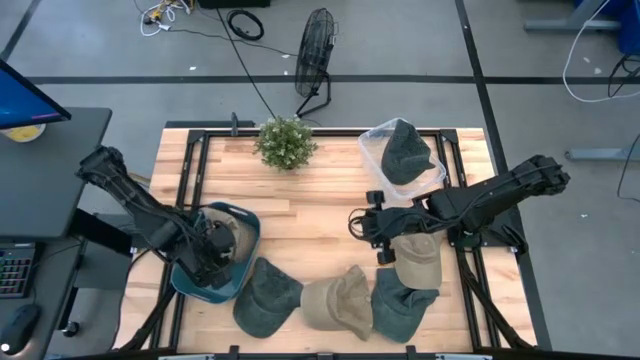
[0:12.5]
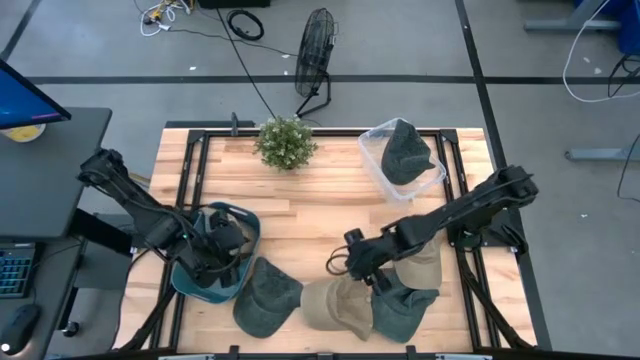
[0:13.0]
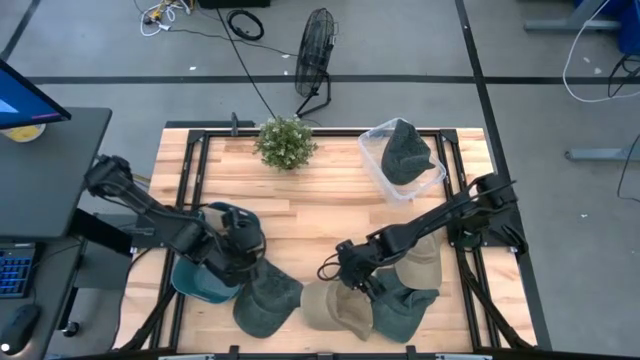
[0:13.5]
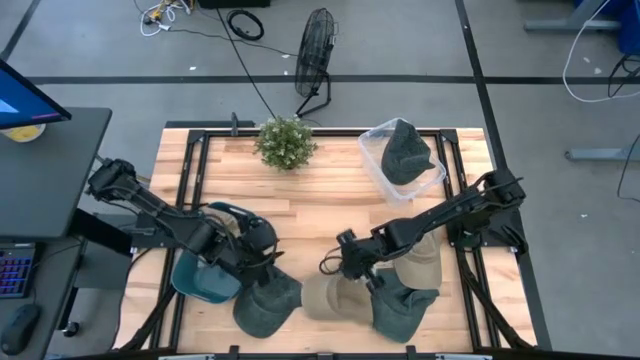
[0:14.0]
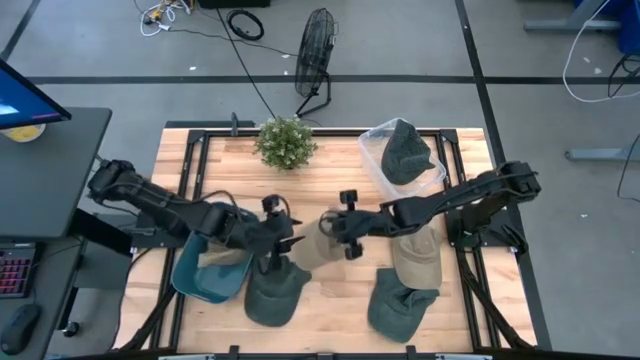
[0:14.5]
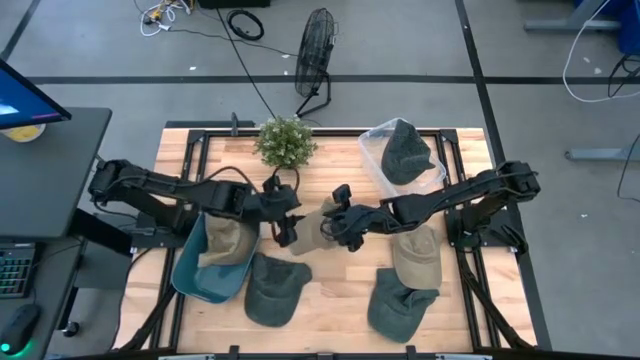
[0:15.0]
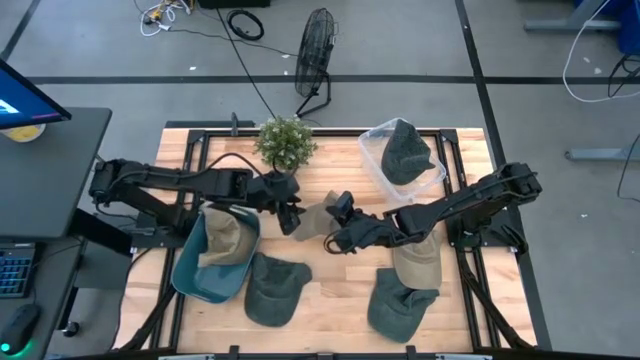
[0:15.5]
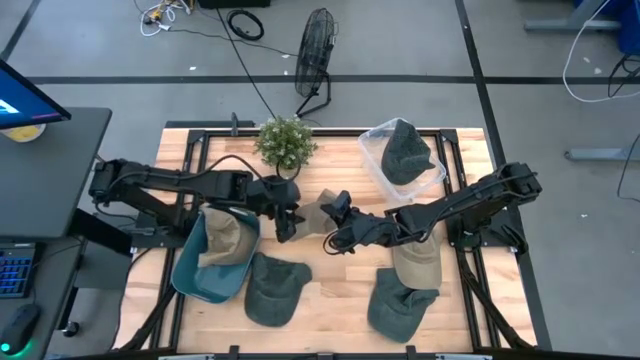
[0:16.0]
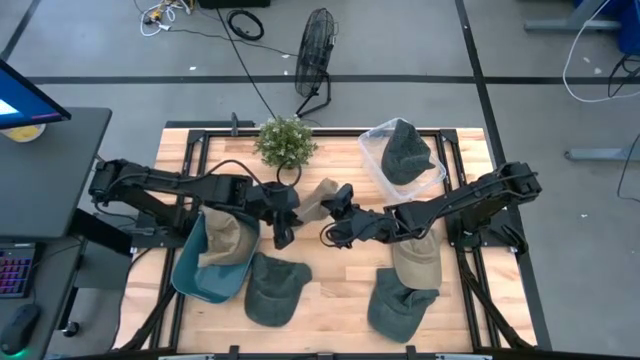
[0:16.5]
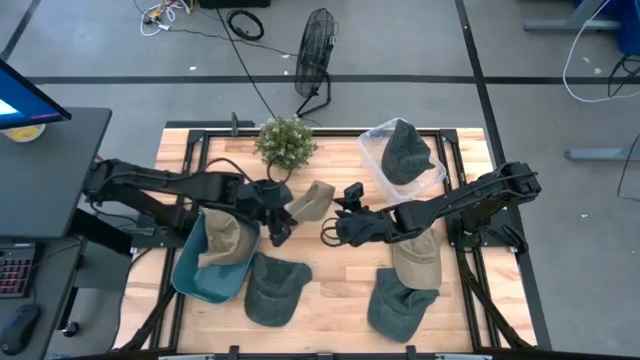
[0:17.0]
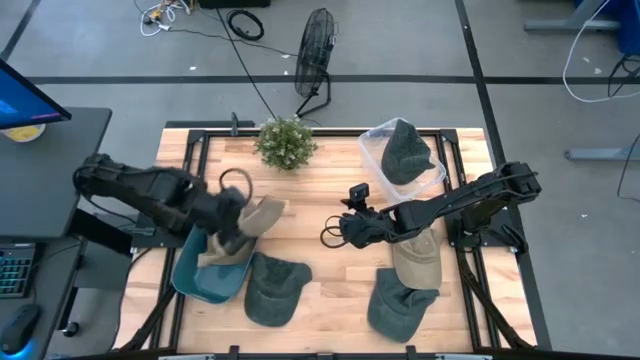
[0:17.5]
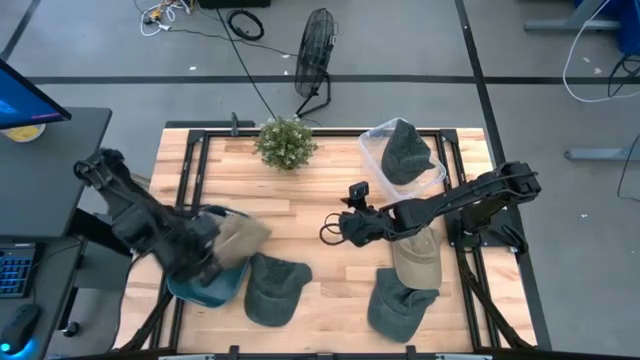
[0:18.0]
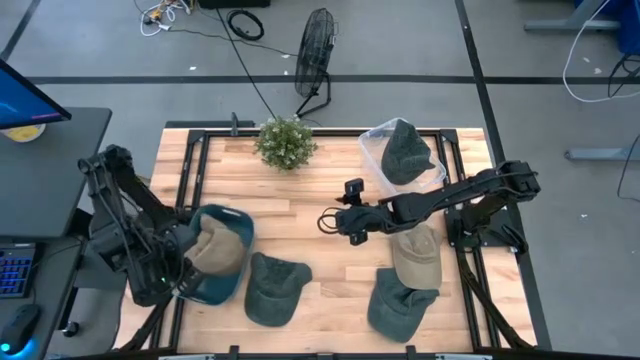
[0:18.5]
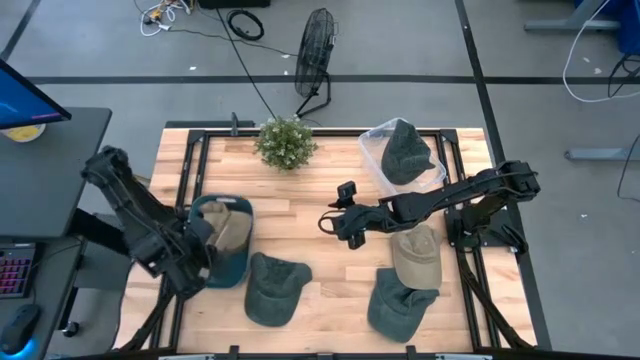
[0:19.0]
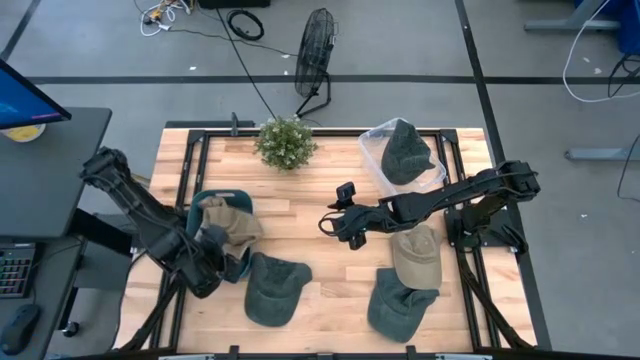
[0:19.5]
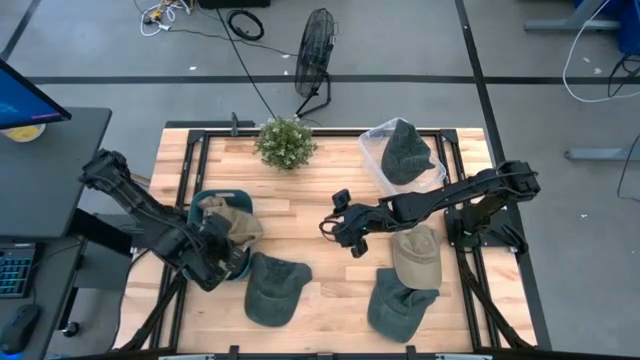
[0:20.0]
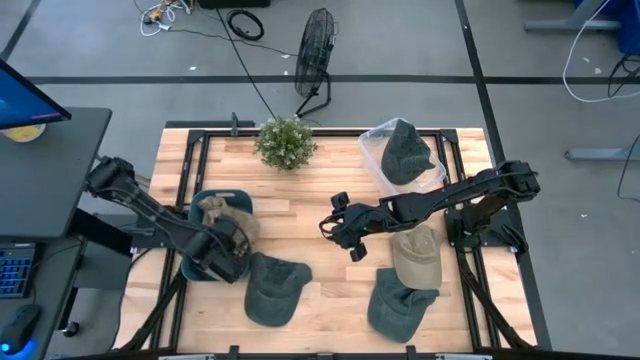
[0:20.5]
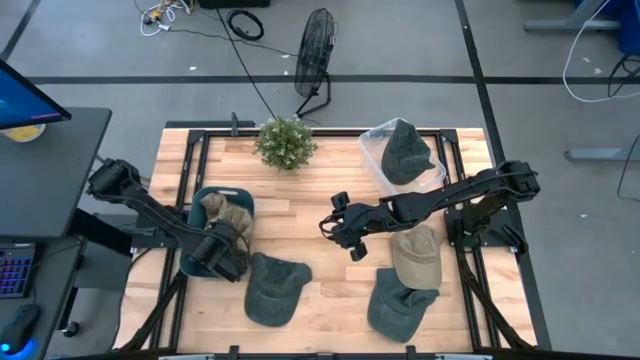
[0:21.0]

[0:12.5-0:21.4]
Task: Pick & Place hat
Put the left brown cap into the blue bin

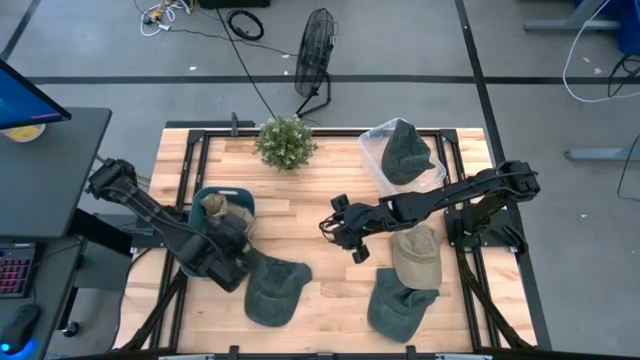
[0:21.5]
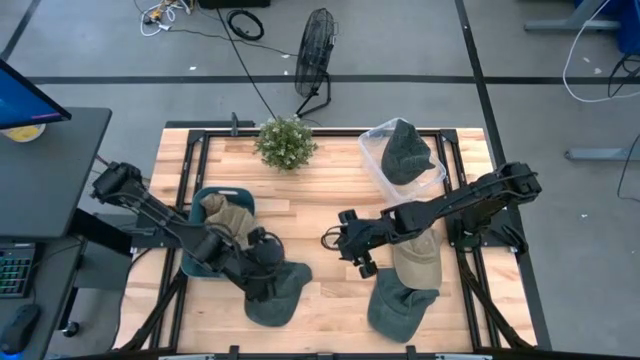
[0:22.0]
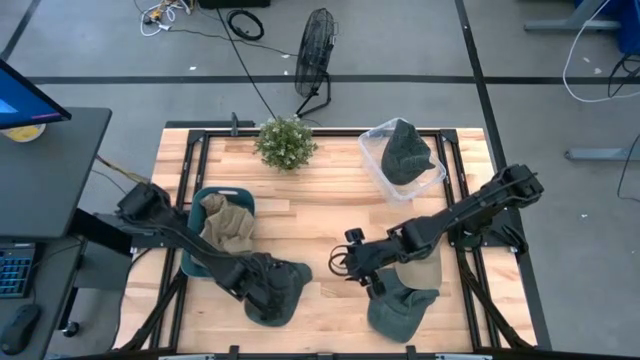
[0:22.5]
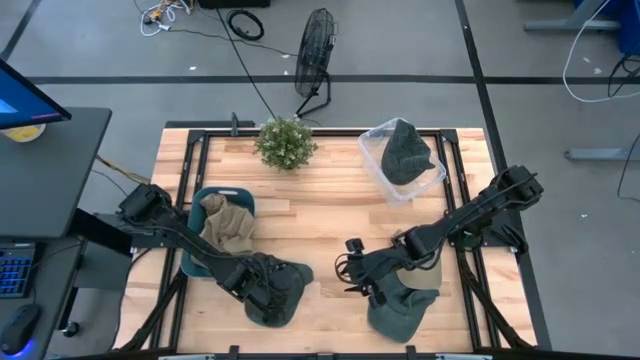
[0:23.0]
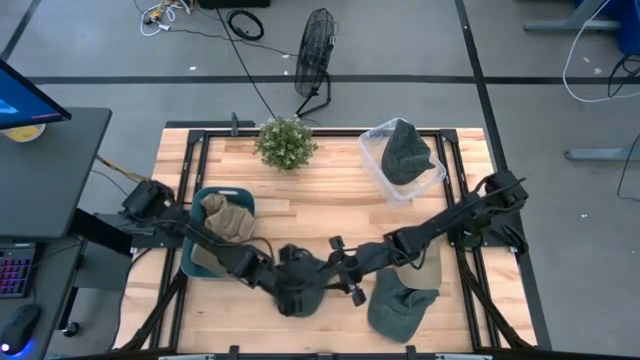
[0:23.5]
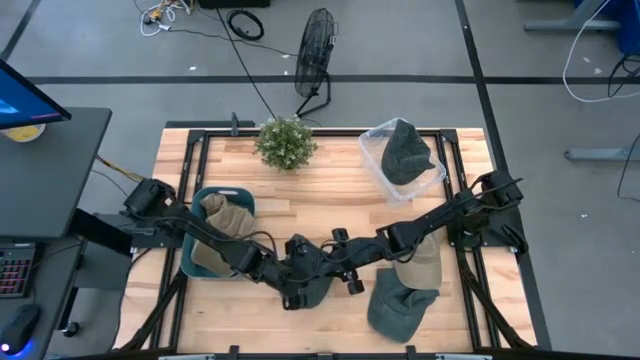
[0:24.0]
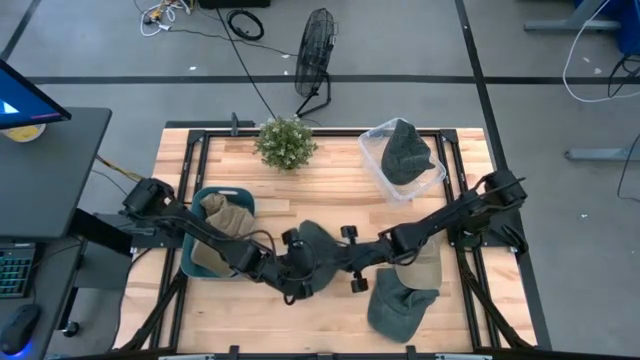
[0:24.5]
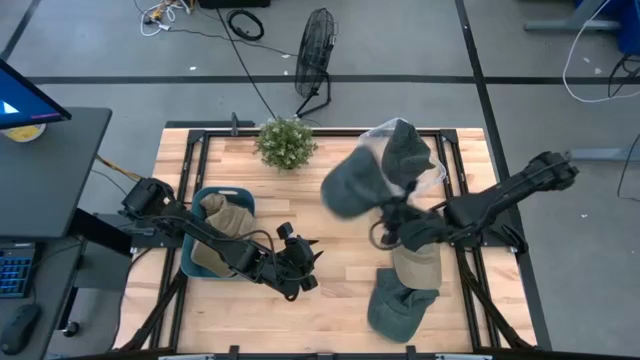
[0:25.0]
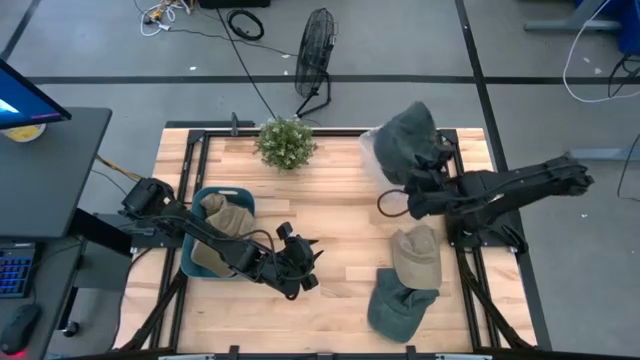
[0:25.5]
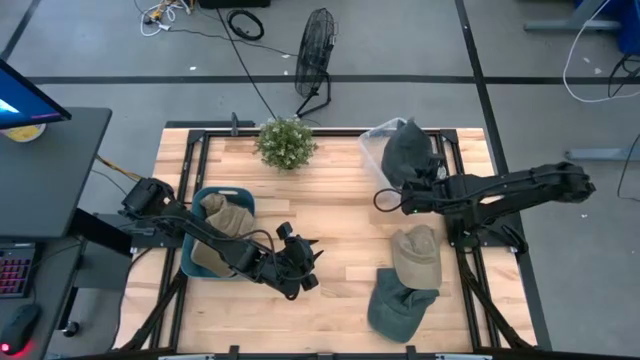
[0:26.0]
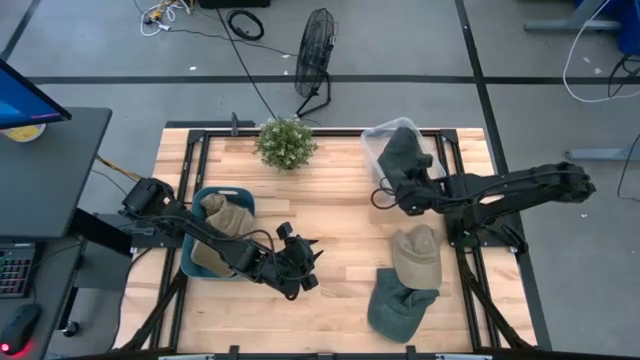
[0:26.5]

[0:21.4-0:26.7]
Put the left black cap into the transparent bin

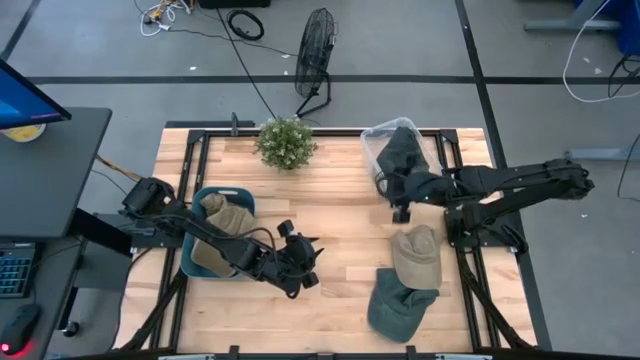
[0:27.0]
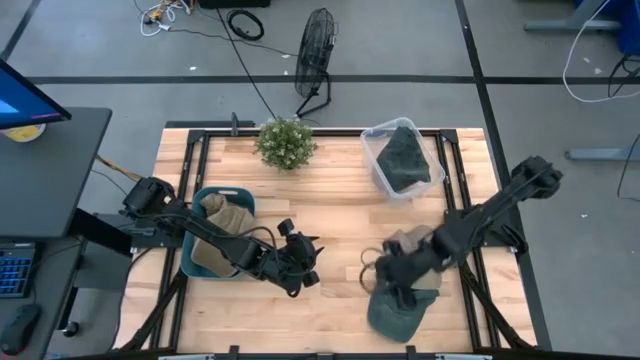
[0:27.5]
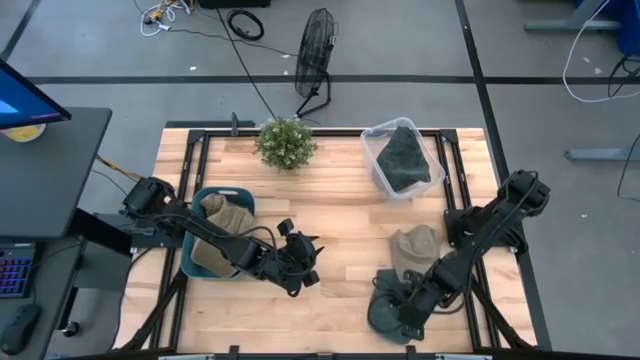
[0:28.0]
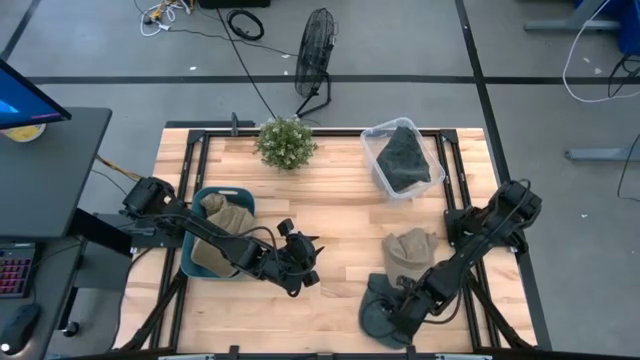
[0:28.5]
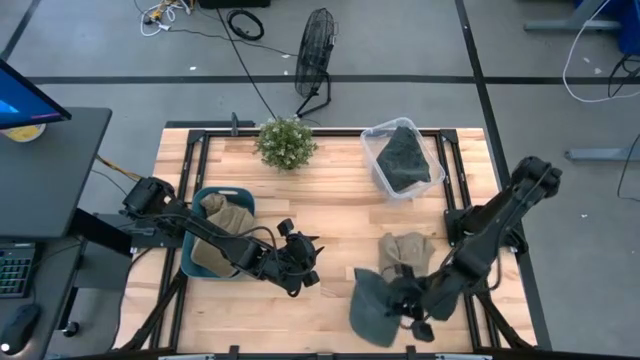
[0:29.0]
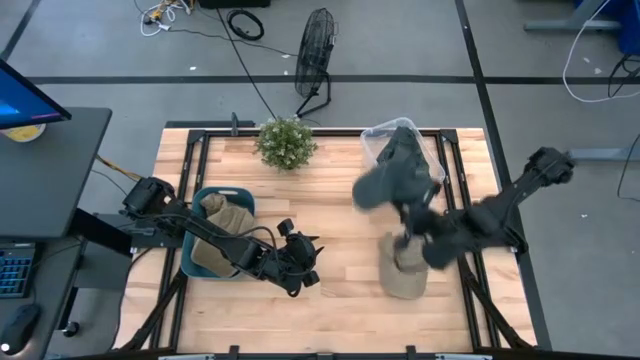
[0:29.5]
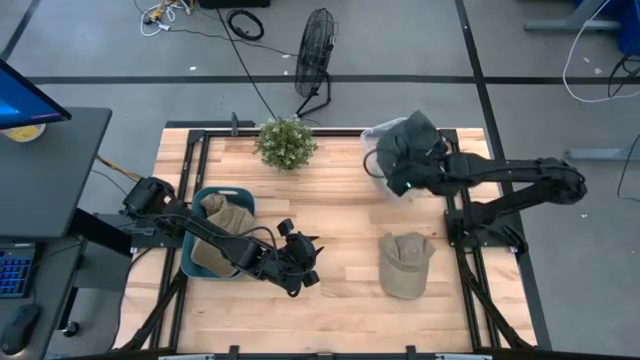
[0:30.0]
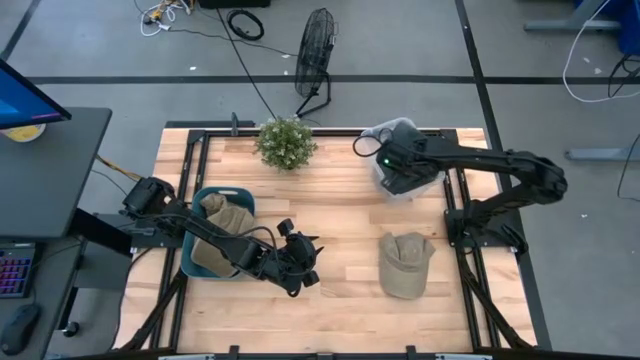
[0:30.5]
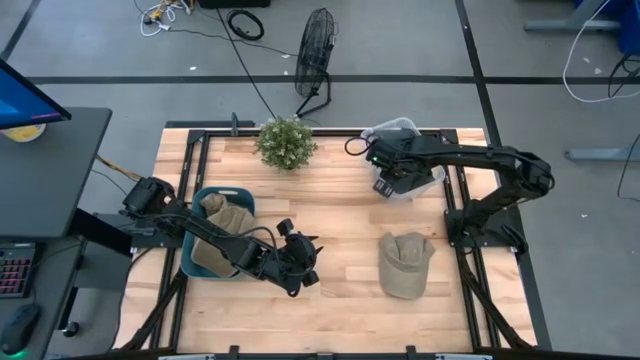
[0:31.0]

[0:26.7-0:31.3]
Put the black cap into the transparent bin

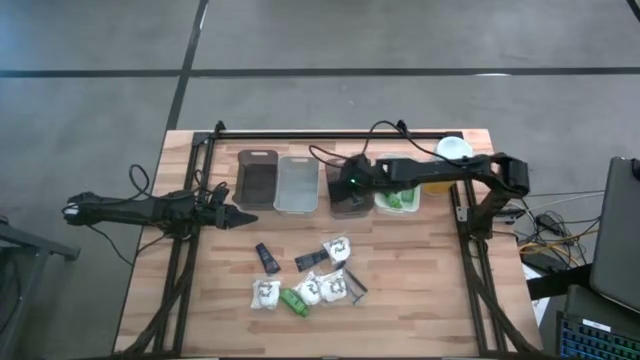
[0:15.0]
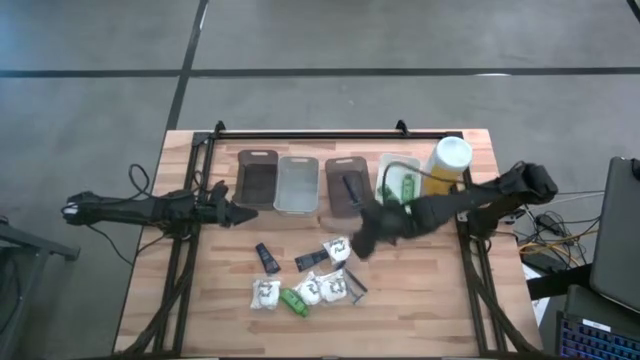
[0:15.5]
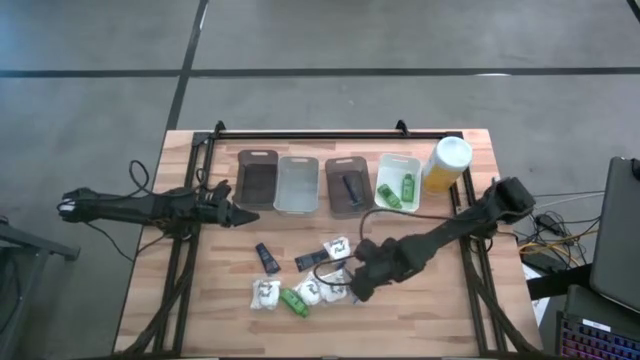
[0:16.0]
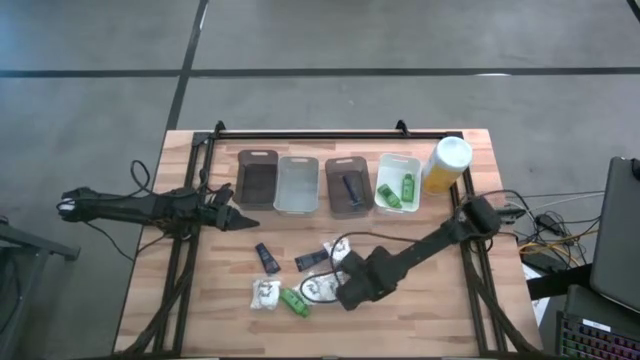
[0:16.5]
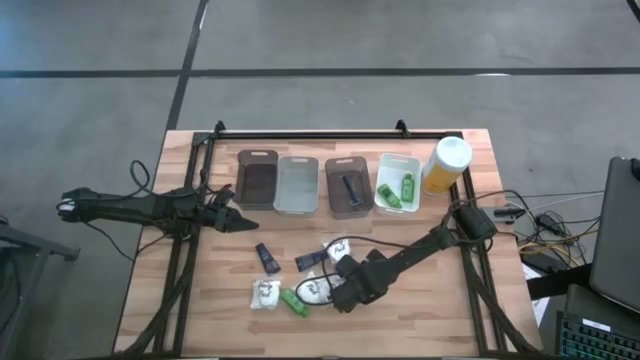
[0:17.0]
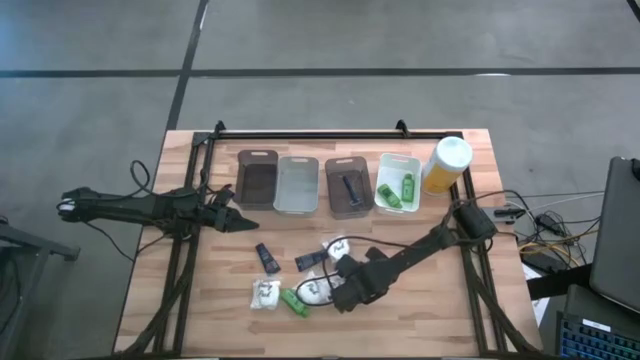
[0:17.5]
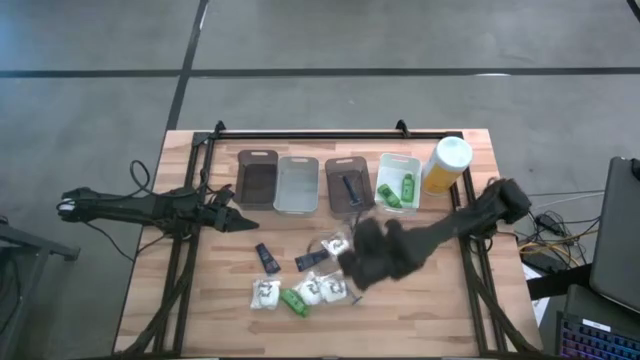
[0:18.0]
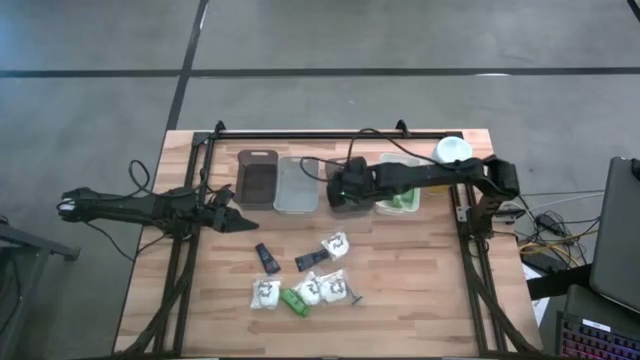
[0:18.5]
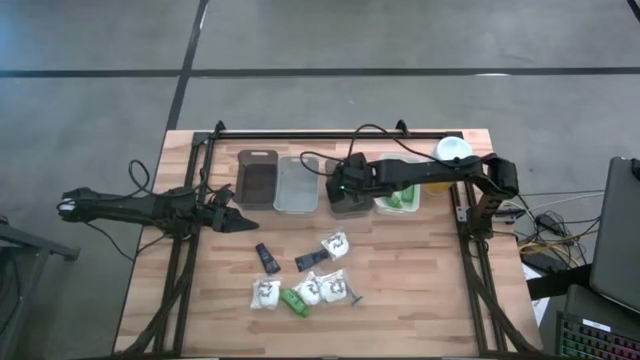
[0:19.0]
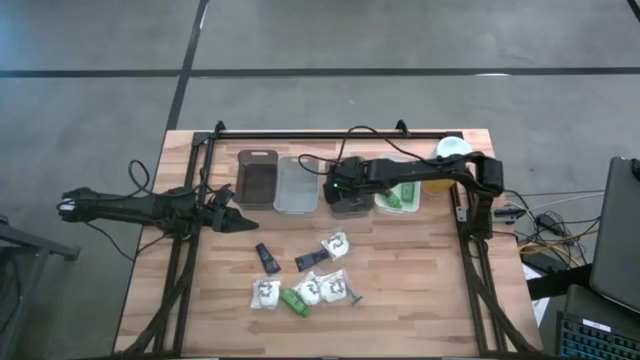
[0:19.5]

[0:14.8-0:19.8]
Task: Pick & Place Travel size toiletries
Put the blue razor into the right black bin
